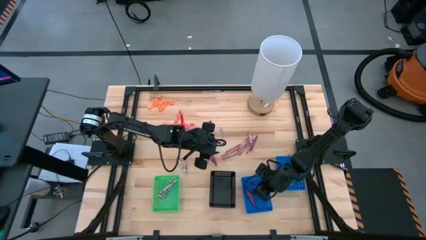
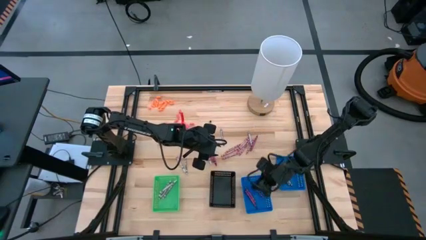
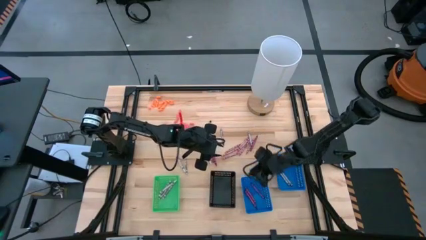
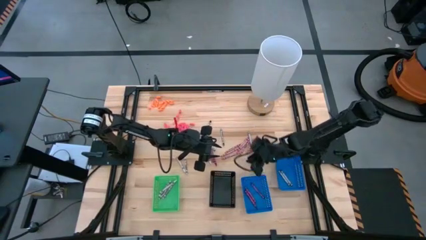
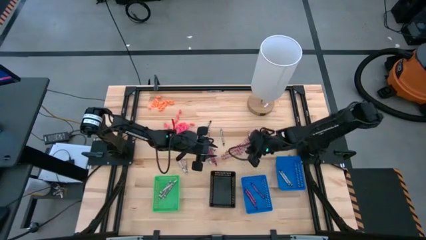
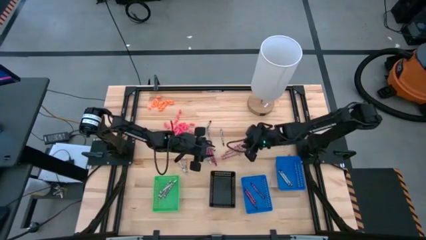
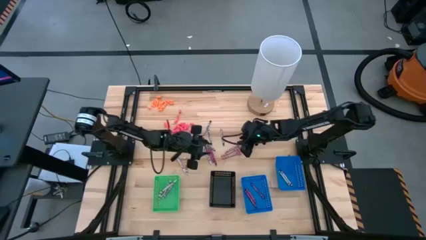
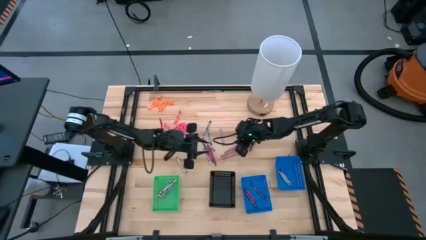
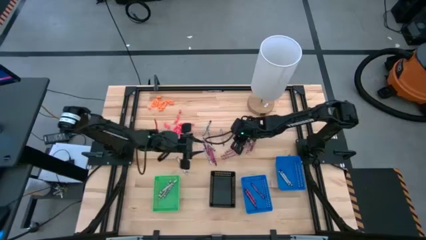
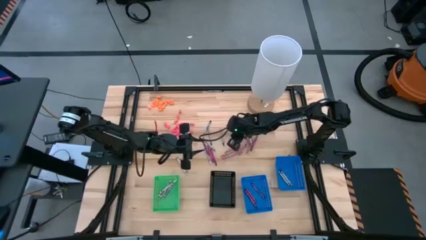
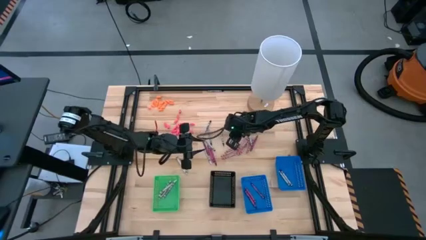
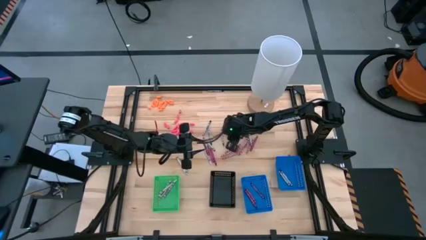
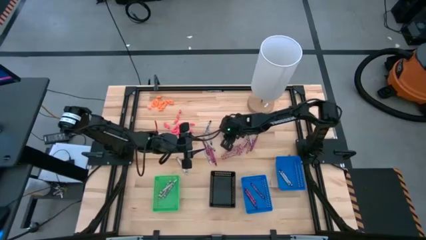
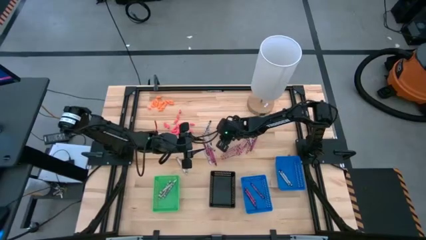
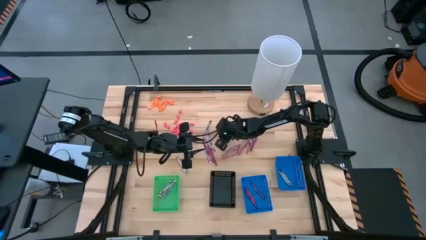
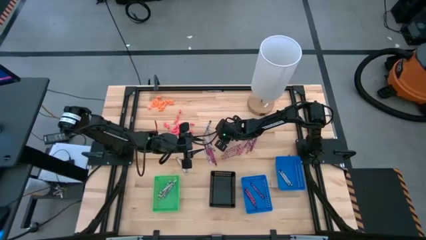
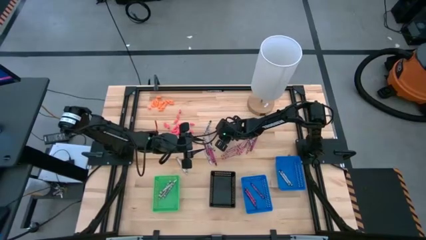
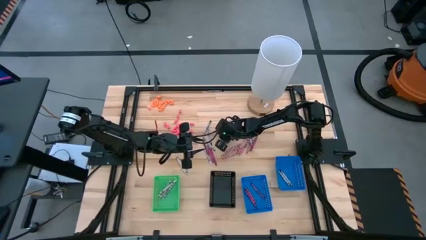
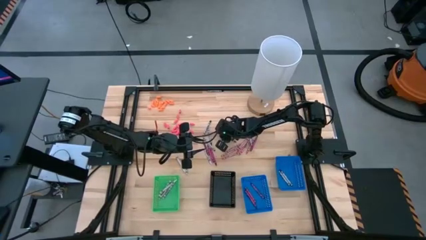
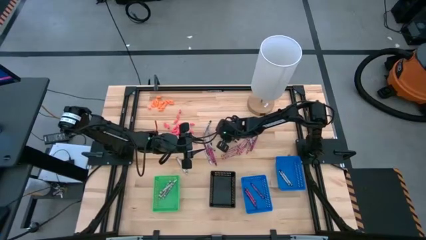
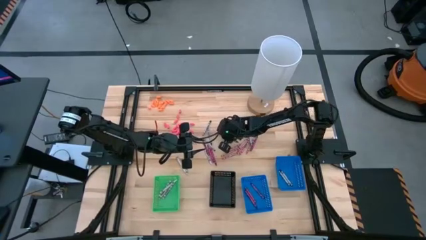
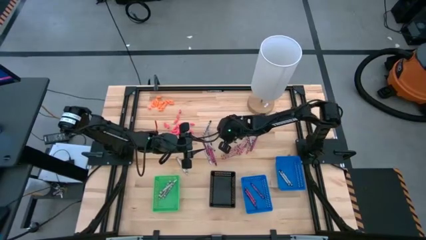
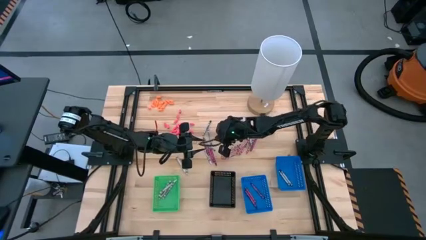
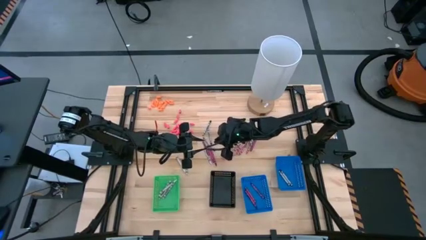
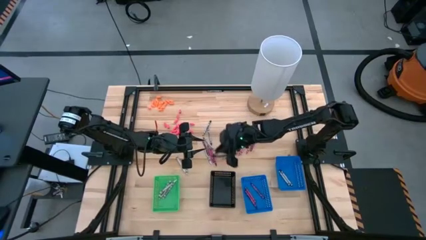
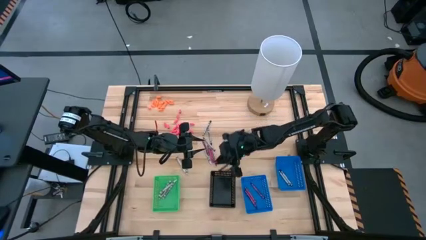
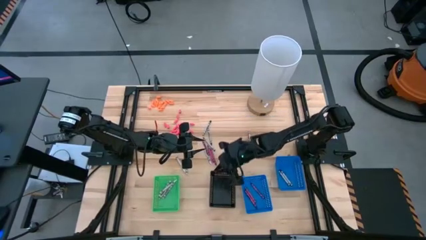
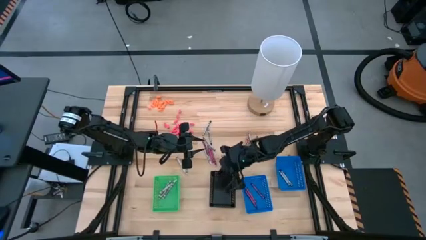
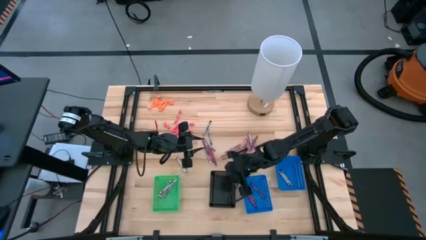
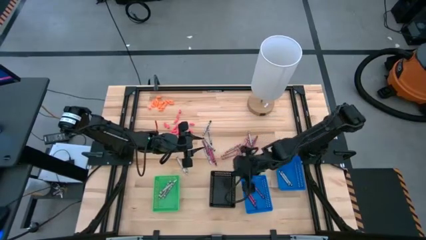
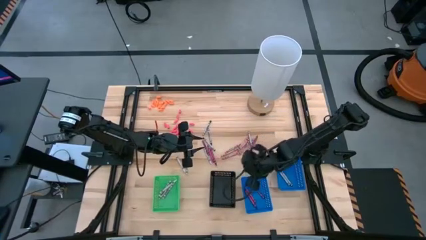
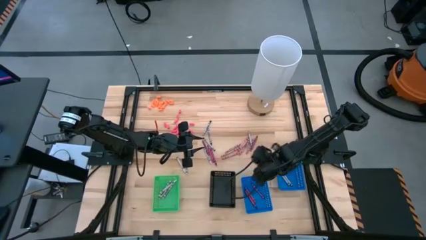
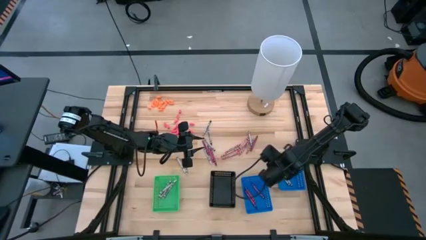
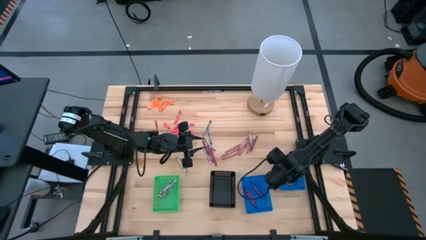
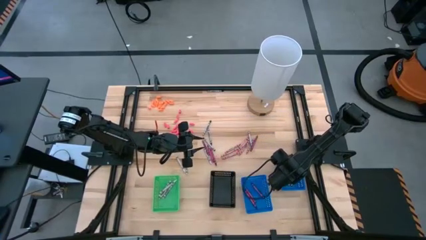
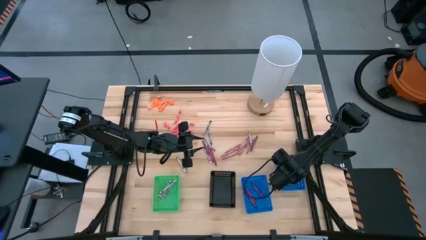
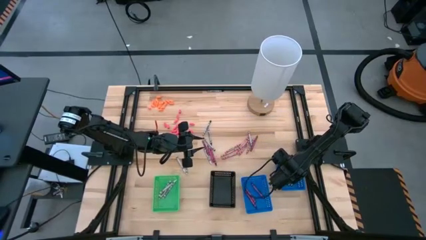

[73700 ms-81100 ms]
Task: Sort crayons
Put the black crayon into the right blue bin

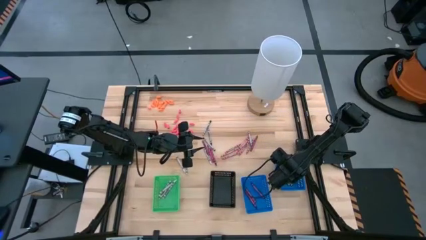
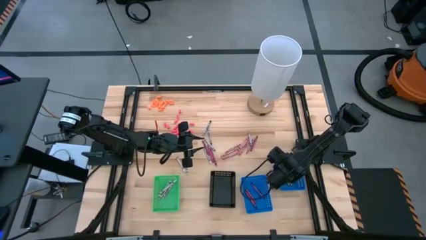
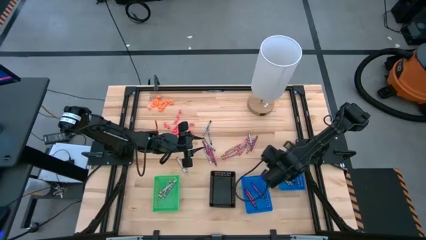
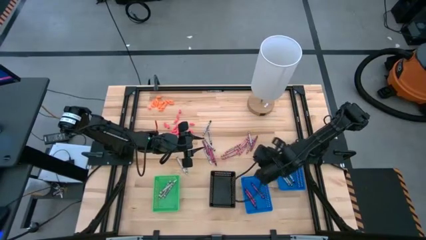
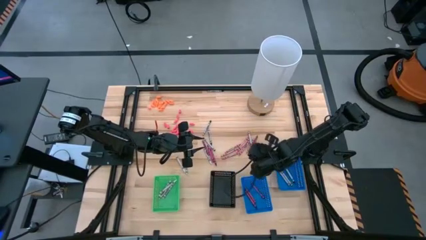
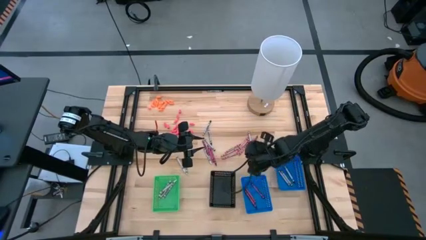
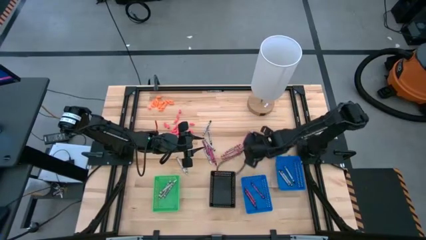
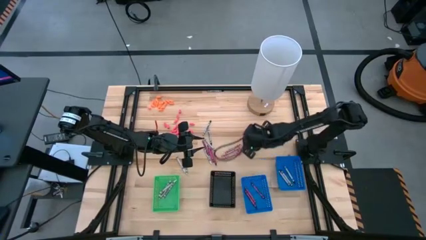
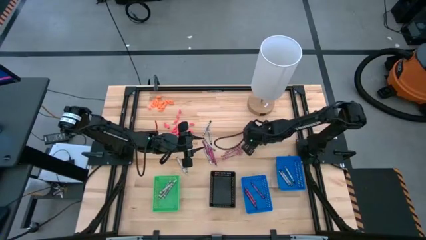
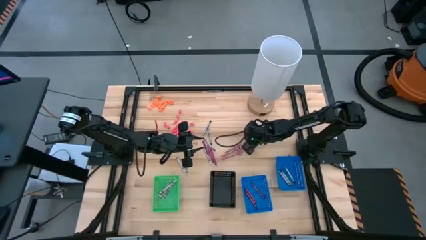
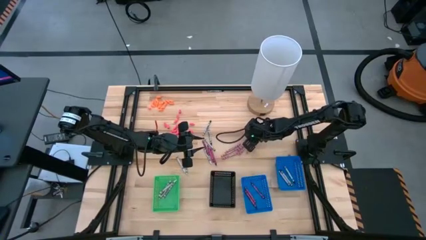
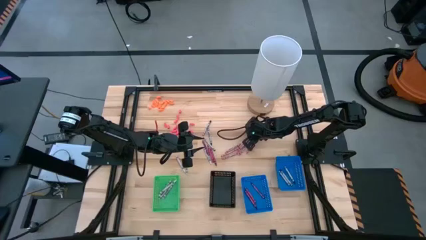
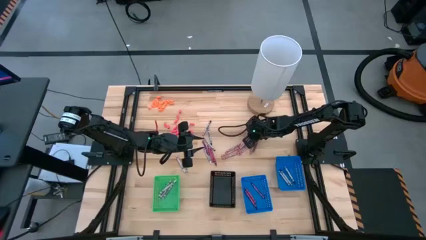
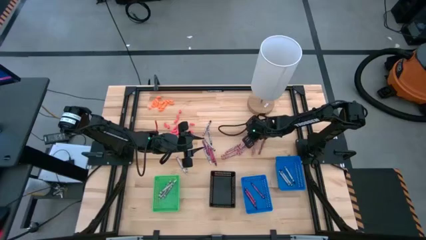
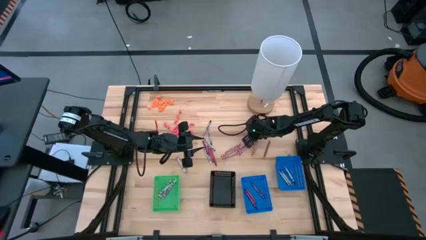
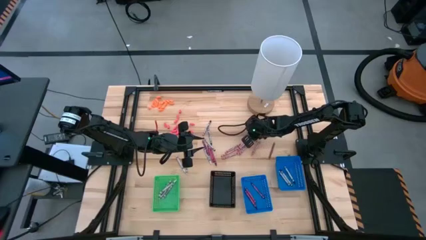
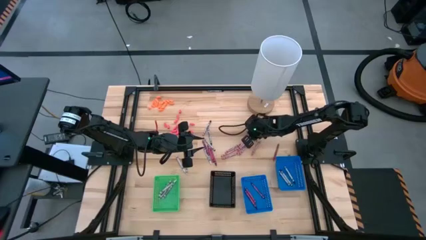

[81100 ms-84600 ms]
Put the black crayon into the right blue bin

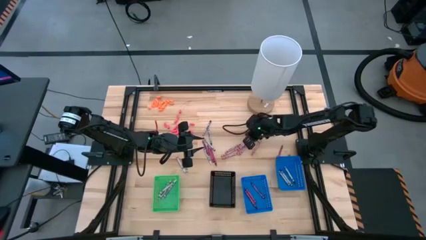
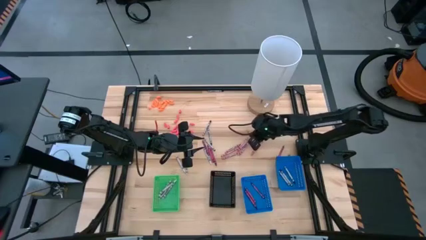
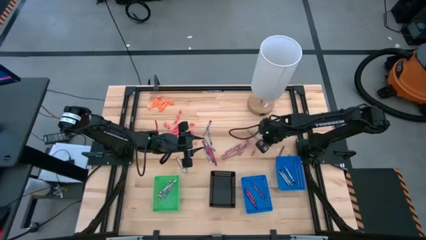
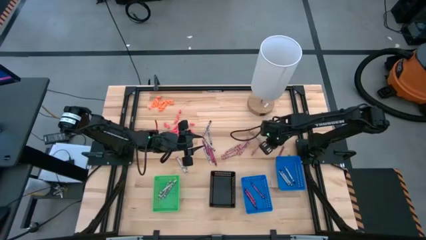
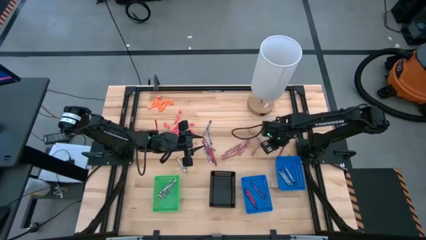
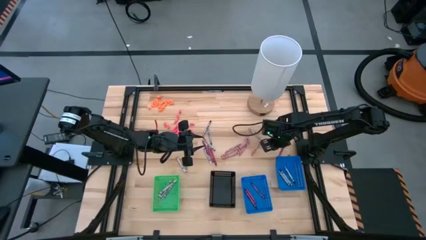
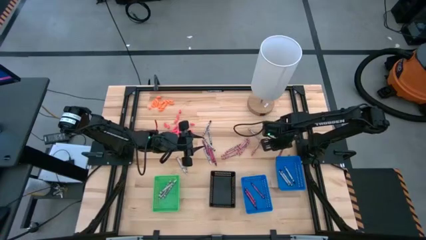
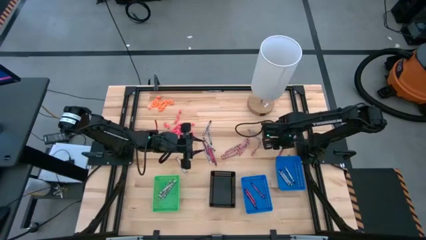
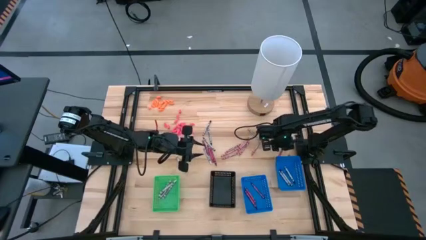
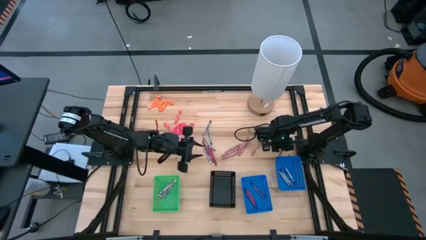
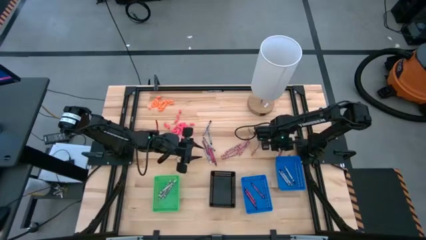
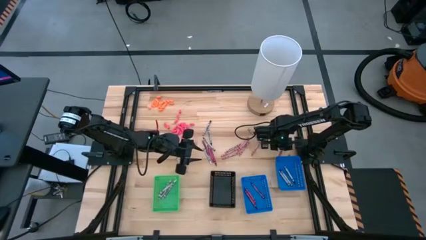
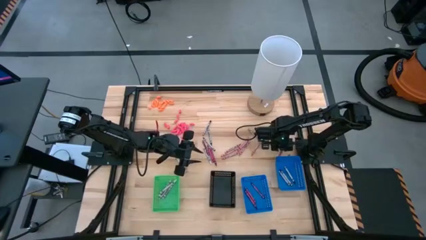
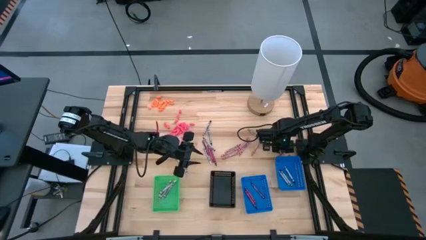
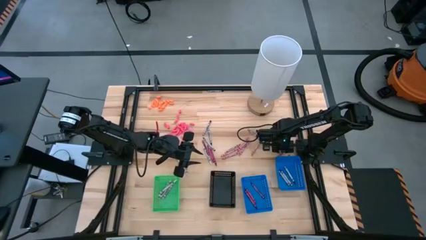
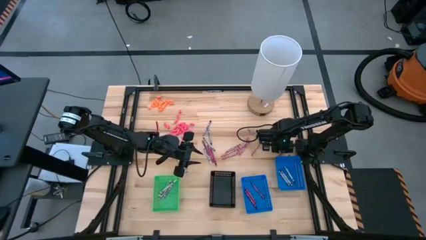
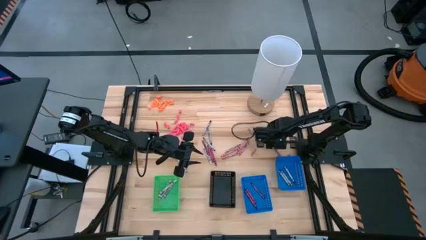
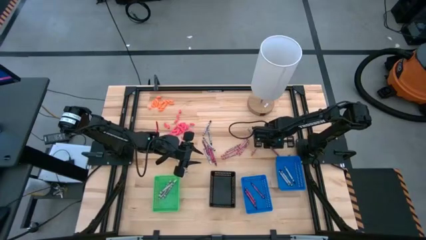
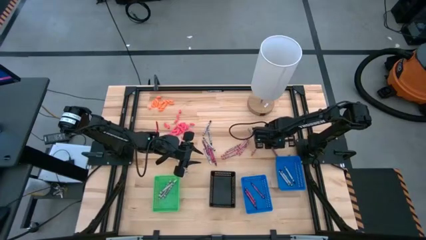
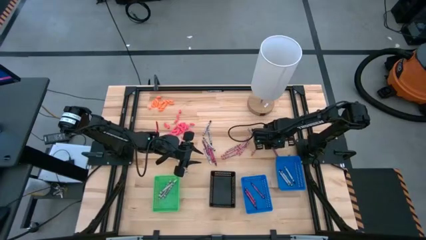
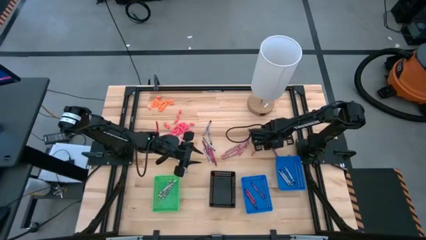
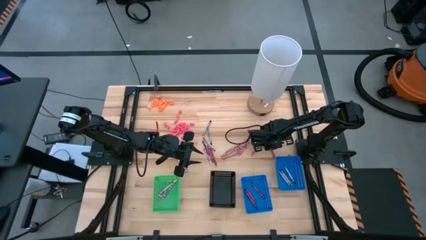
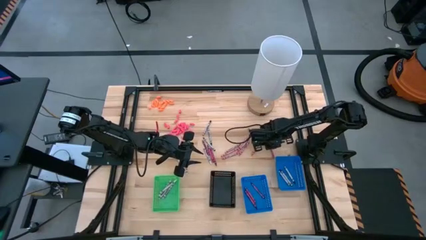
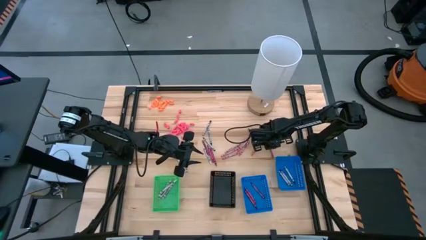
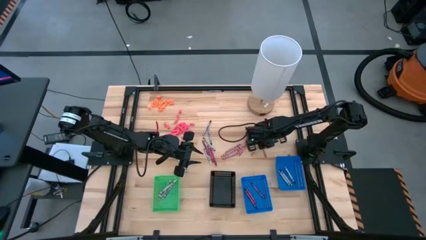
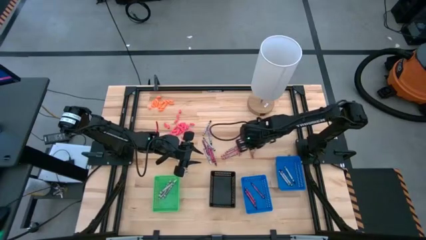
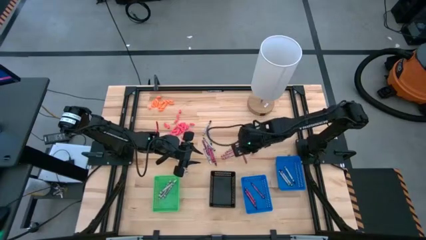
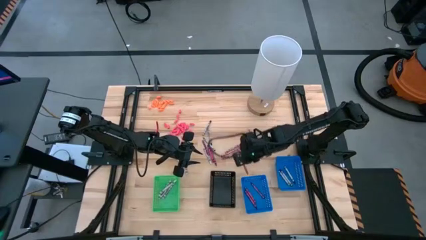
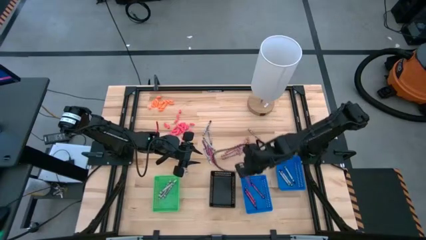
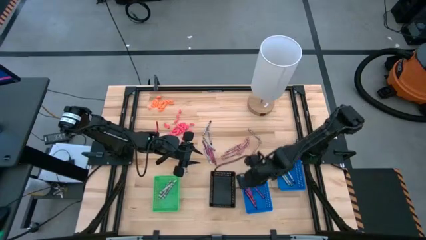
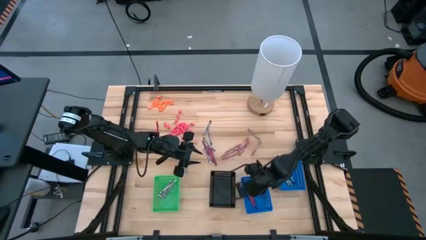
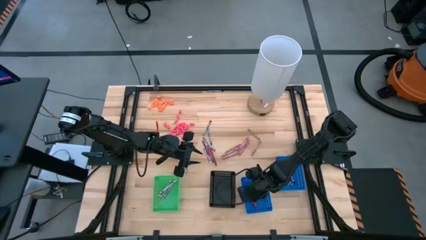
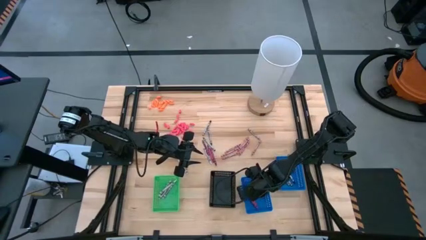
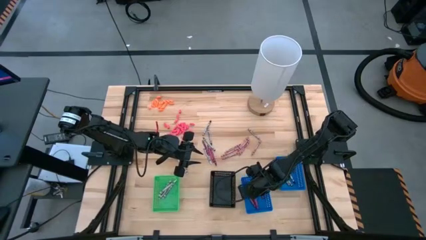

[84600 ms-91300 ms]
Put the red crayon into the left blue bin
